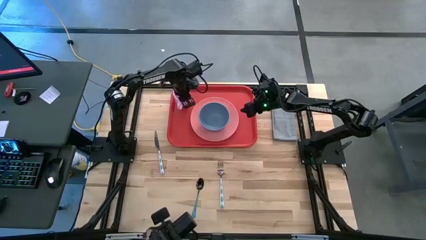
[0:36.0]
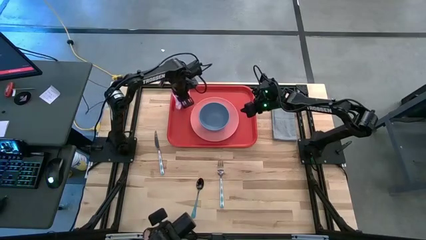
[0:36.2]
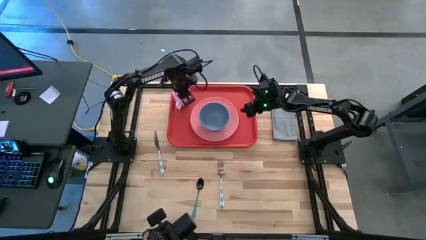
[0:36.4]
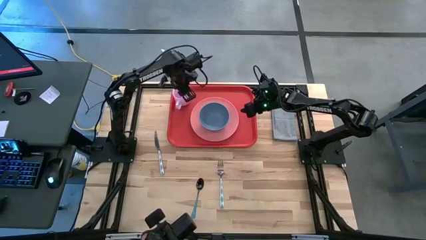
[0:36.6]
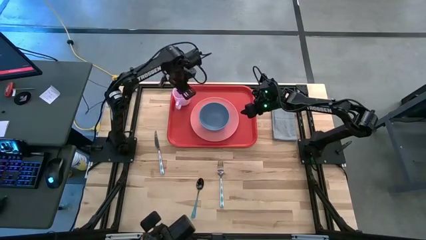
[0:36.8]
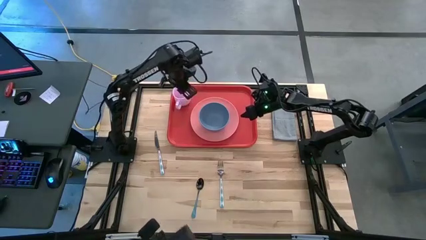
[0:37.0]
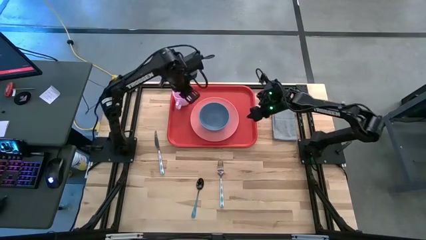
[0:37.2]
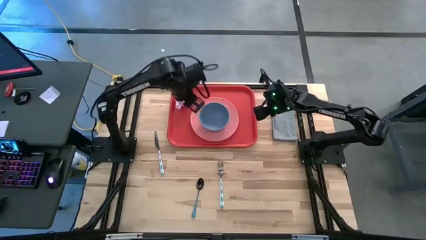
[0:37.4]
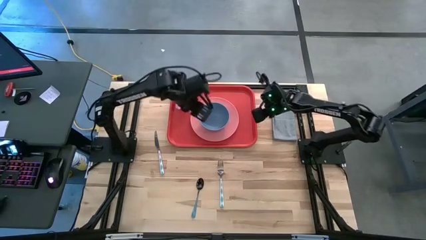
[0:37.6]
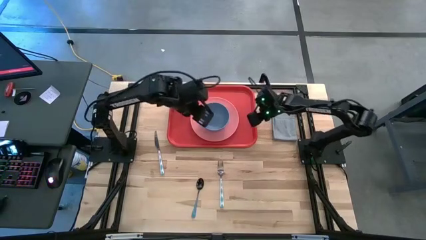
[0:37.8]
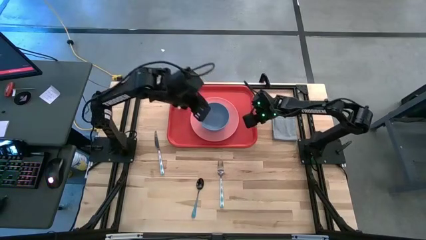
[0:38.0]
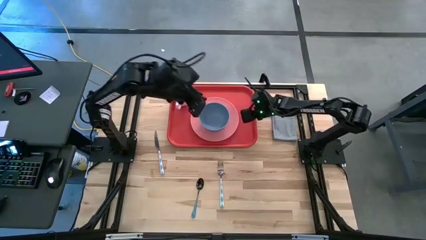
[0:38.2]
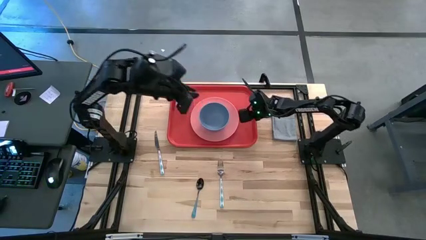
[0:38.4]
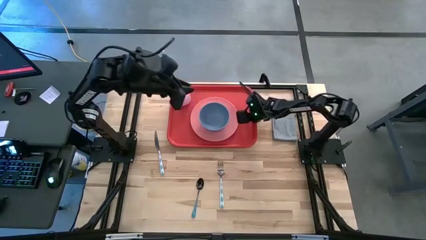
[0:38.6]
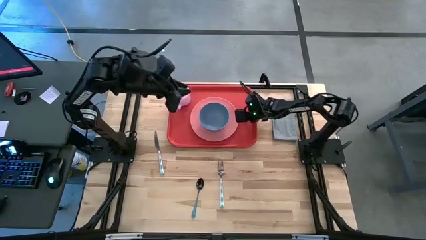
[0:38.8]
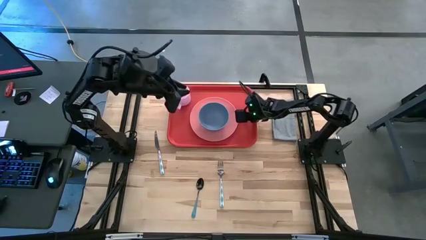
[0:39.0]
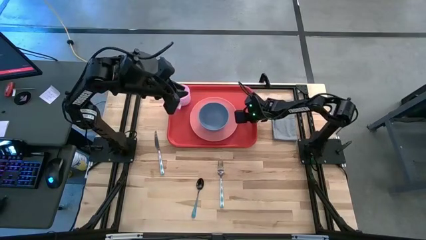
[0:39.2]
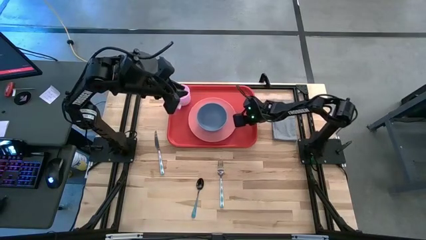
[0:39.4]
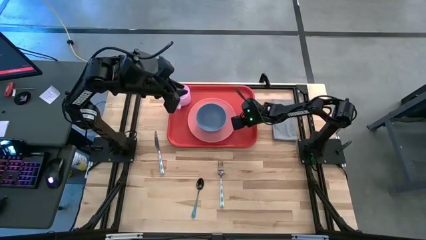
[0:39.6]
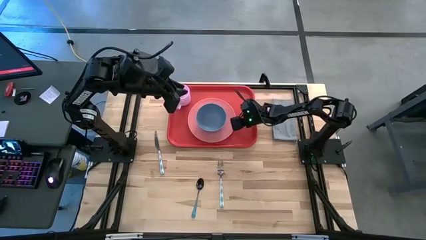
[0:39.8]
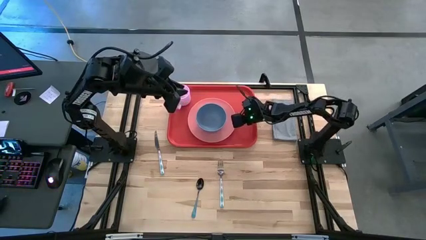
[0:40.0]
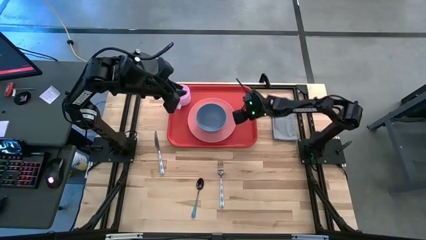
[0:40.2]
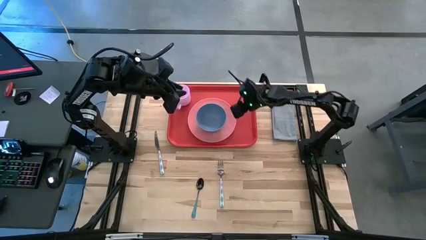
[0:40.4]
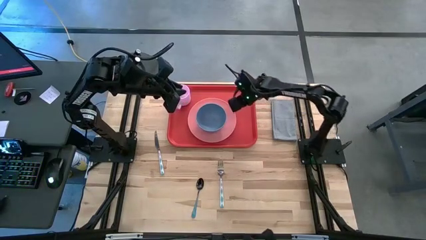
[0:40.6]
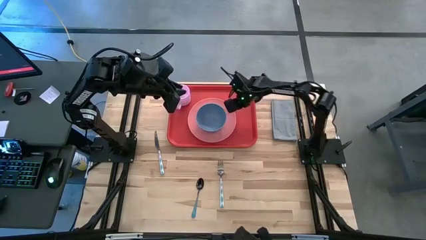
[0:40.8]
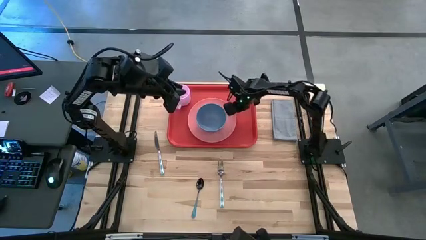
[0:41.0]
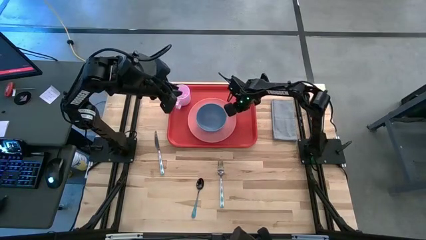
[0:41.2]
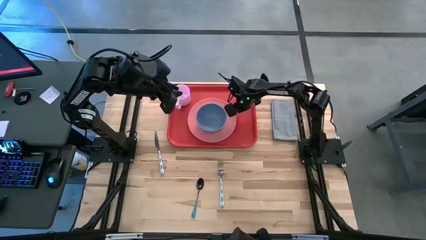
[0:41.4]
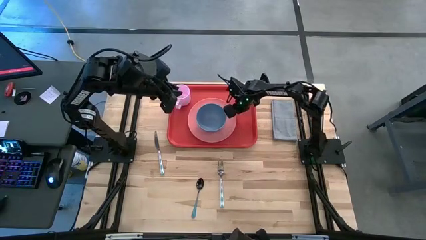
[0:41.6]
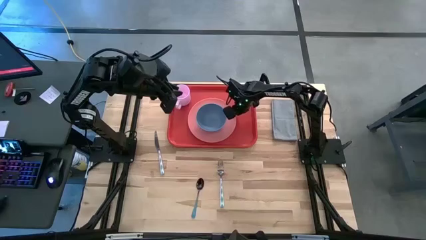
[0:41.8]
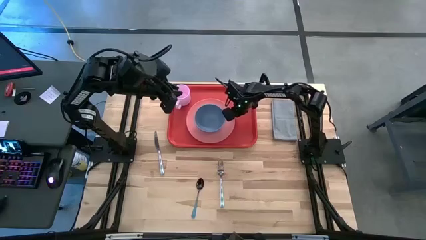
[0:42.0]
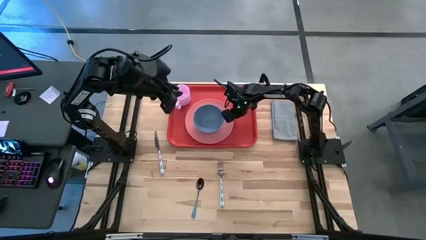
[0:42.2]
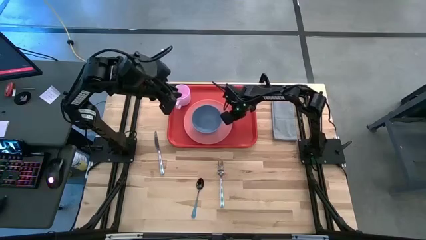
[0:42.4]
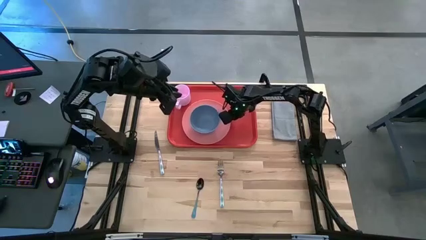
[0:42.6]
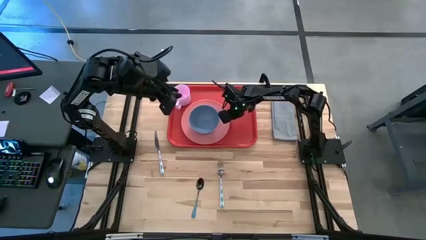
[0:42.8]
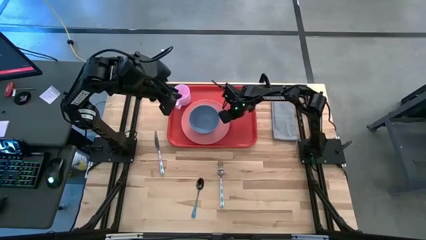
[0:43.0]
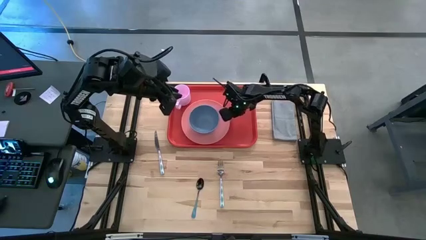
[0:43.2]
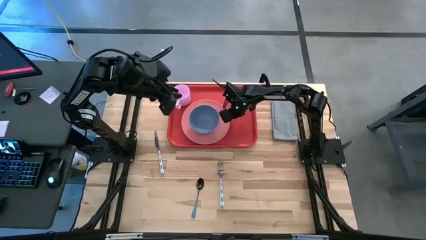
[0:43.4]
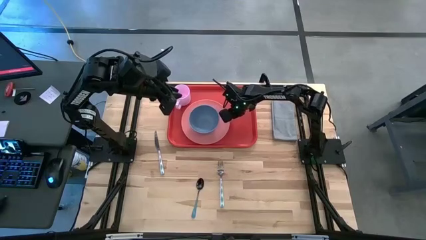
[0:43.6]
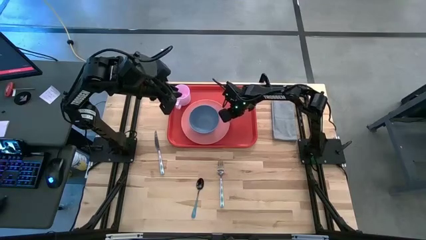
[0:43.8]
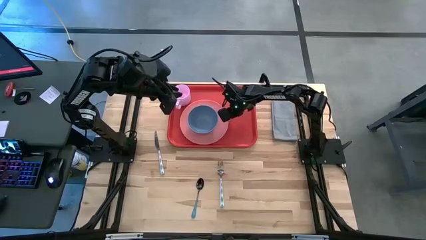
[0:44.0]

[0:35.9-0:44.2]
Task: Set up tray
Adjust the pink plate on the red serving tray

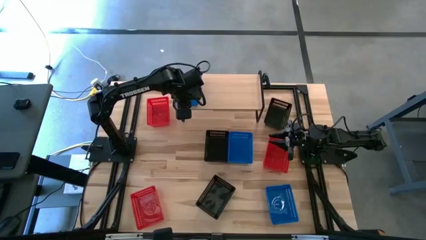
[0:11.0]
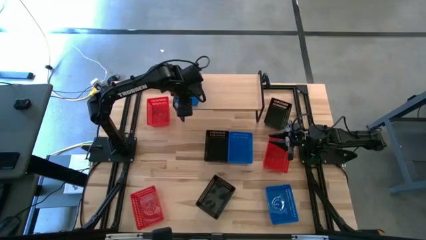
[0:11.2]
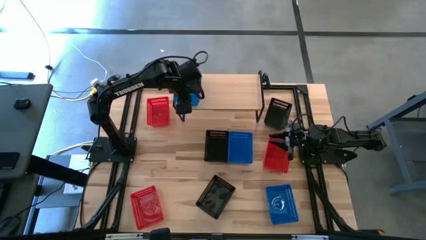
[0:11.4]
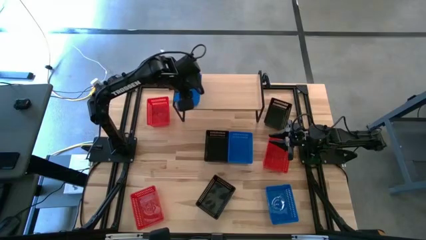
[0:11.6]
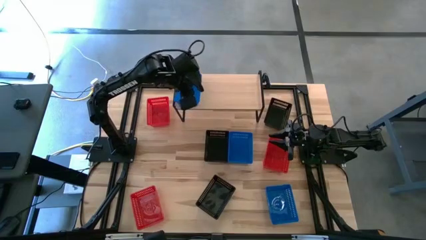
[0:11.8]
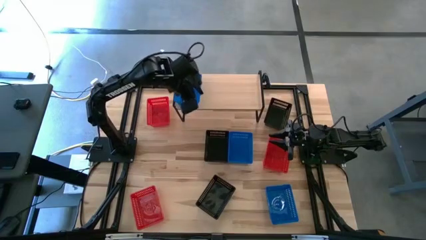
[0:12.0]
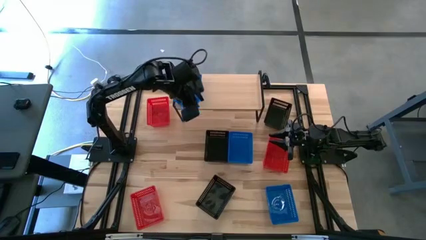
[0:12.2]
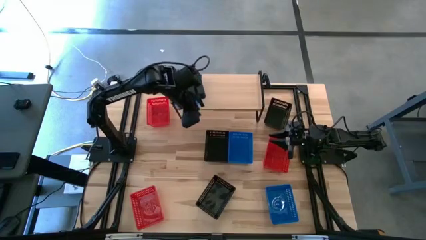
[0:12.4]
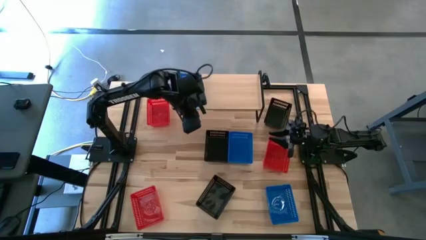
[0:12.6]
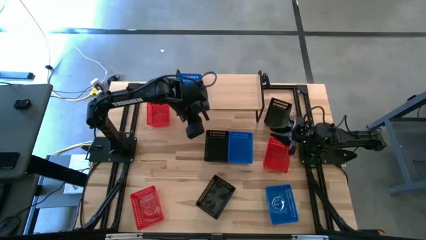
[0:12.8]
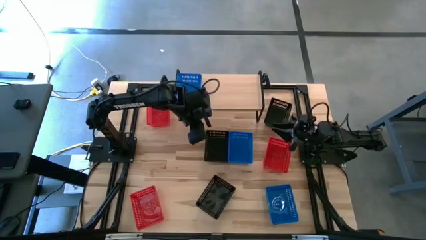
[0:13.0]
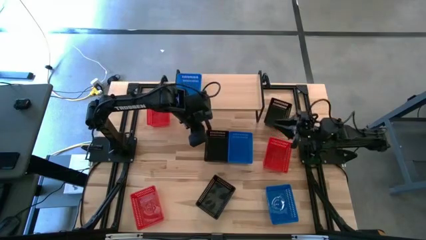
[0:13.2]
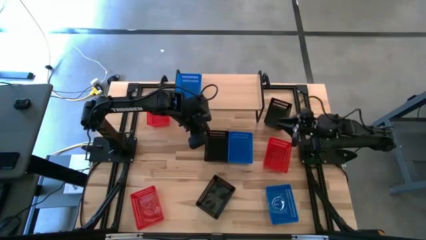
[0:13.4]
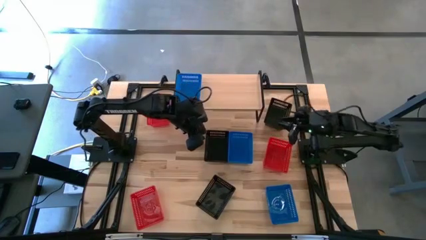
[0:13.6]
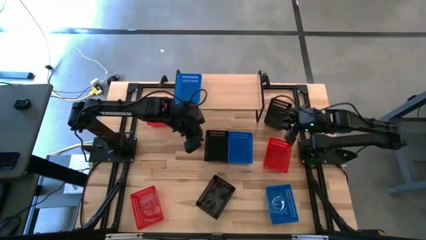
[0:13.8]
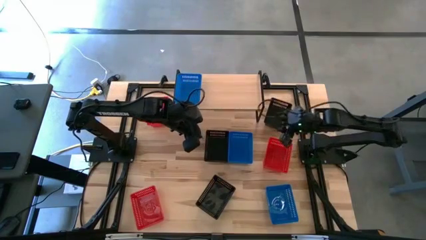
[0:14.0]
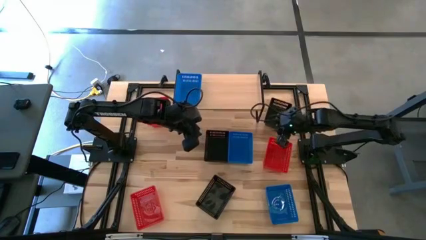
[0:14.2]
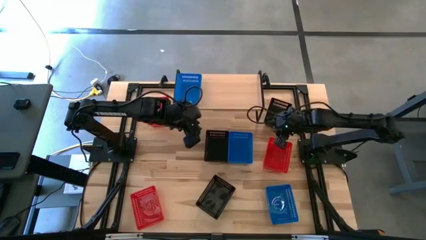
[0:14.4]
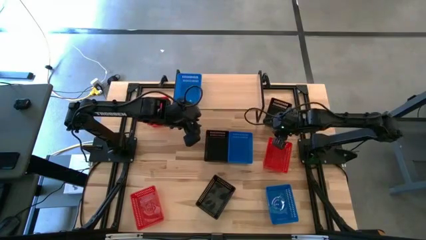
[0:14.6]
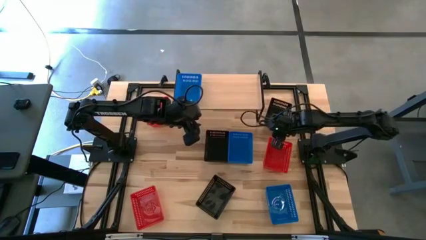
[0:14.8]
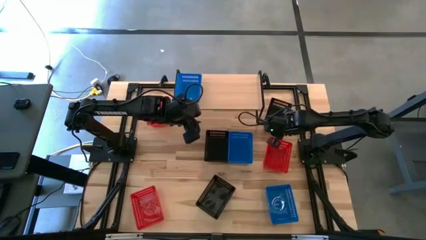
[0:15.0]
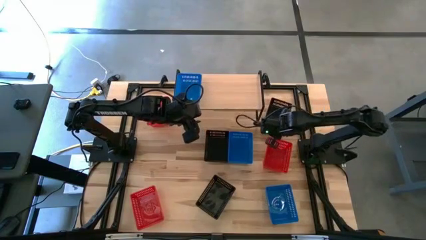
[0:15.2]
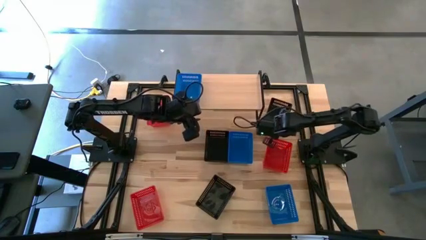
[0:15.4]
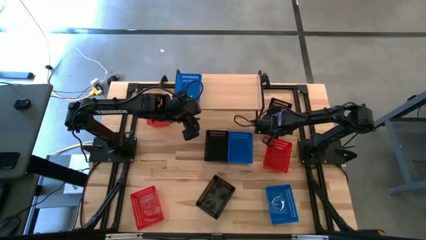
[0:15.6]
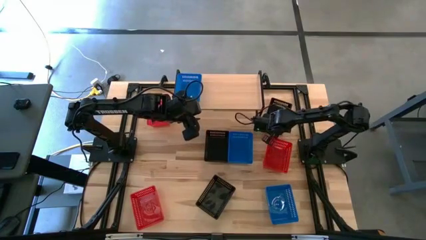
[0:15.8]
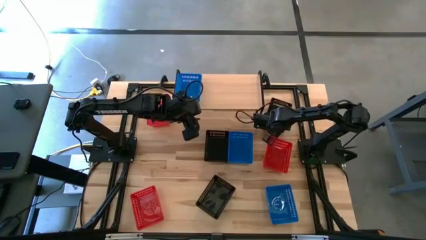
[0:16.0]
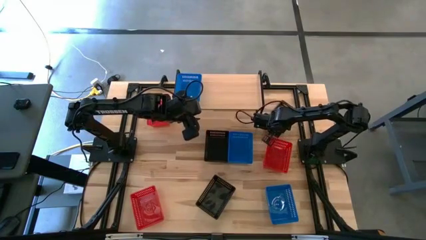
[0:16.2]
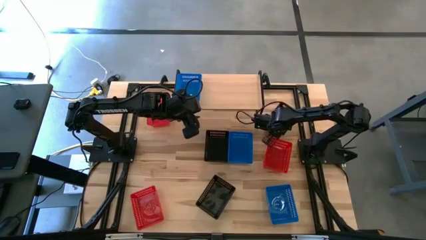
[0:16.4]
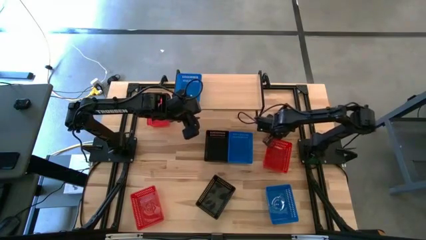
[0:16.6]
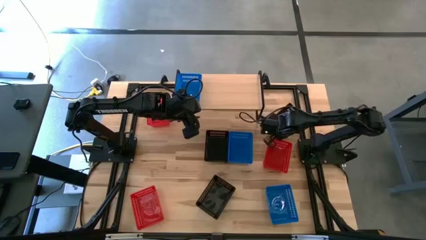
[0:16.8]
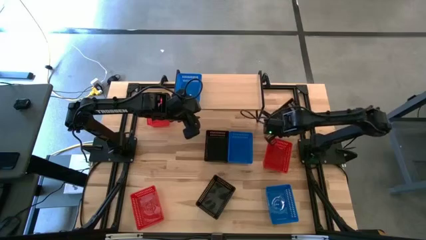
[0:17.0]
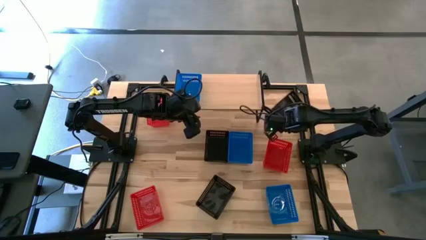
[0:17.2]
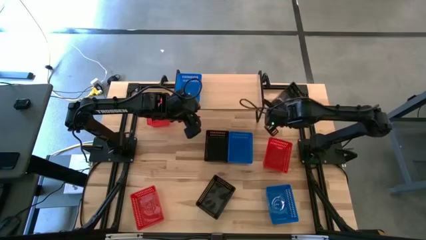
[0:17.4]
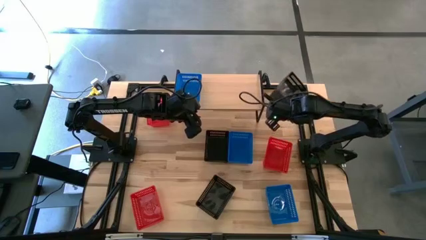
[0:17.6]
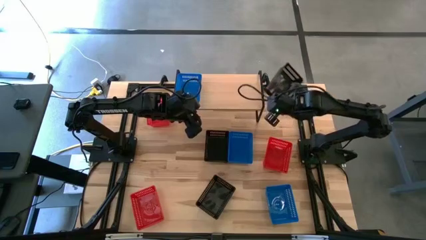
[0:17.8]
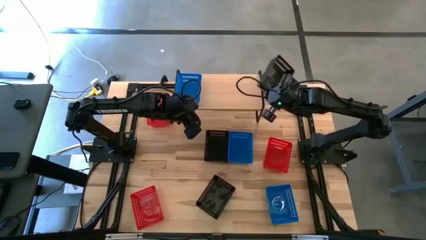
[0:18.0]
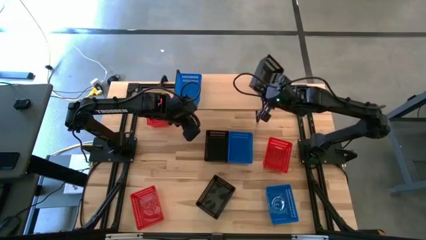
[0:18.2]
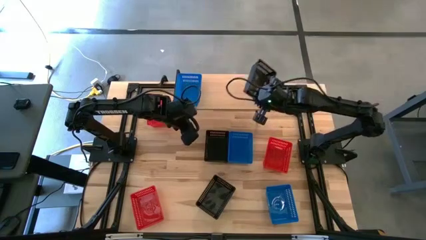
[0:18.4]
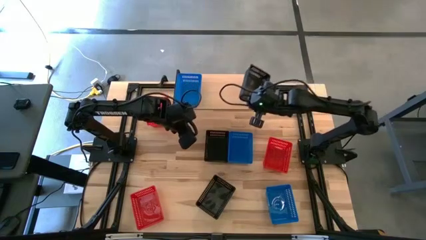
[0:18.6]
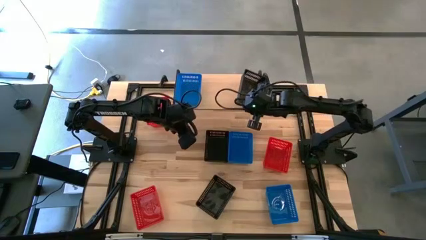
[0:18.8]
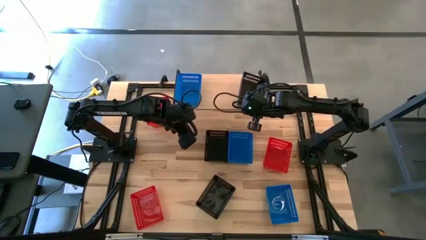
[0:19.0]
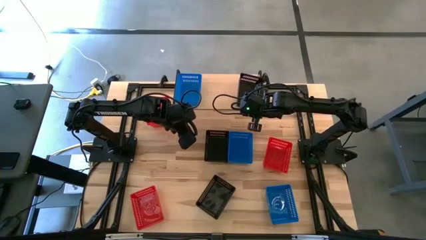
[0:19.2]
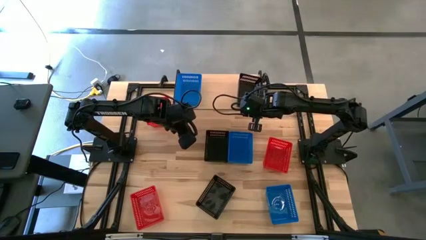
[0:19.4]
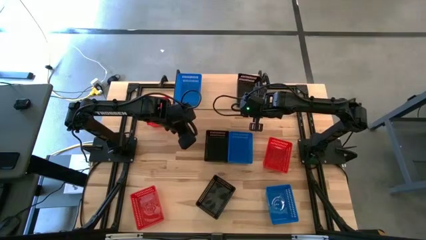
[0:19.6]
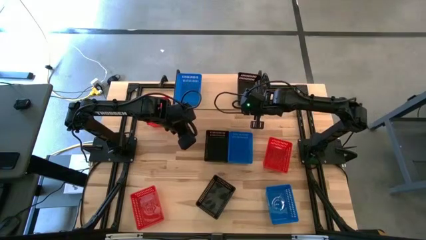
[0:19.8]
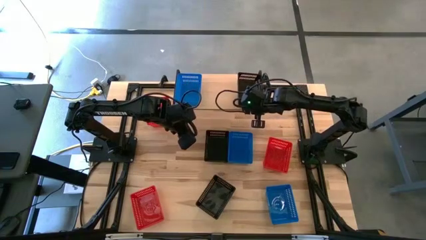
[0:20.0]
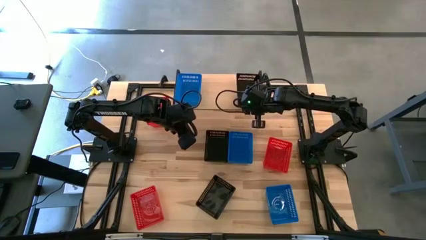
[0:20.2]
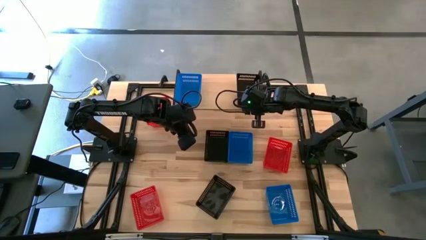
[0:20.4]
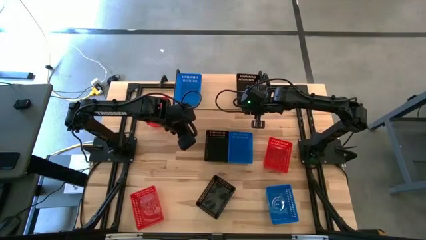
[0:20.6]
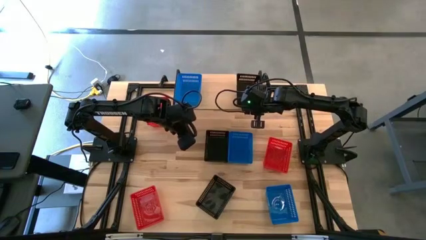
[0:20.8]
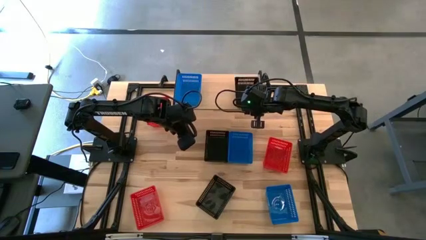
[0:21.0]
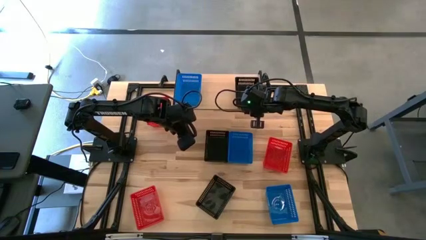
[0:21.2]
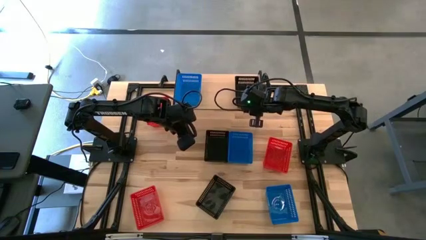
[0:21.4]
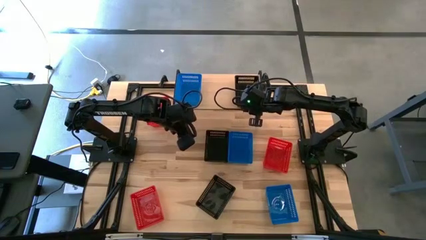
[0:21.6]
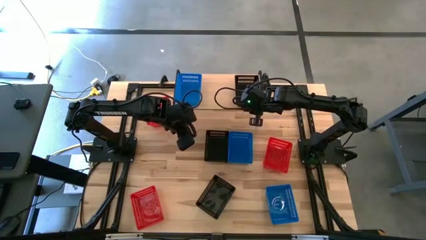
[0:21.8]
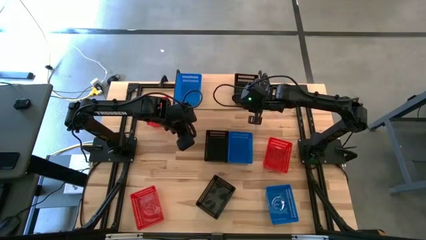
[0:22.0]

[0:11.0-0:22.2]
Task: Stack baskets on shelf by color
Put the top right black bin on the shelf
